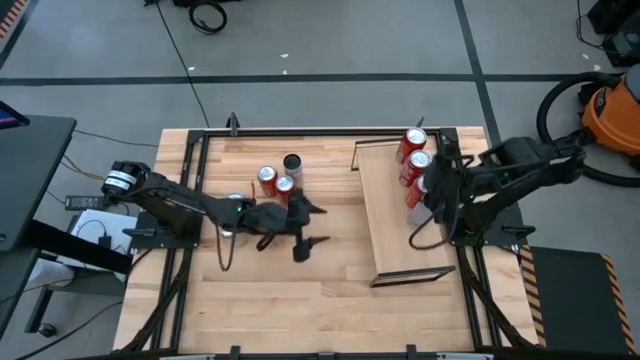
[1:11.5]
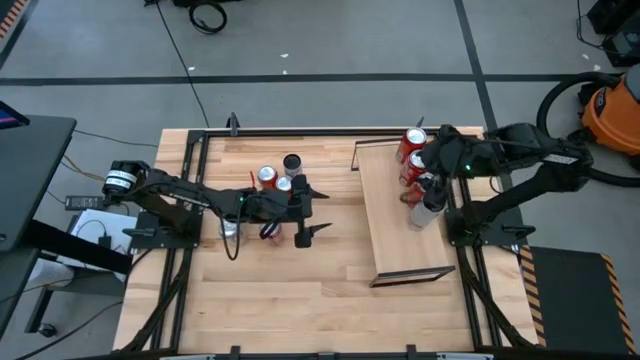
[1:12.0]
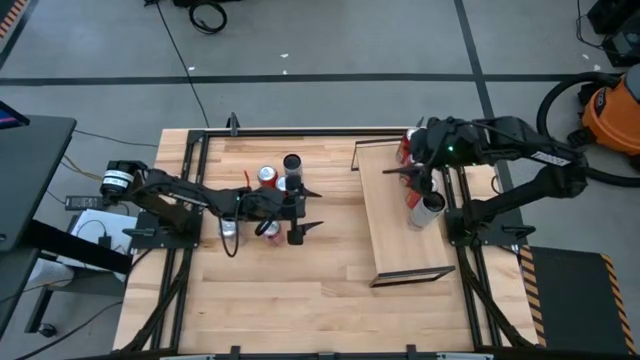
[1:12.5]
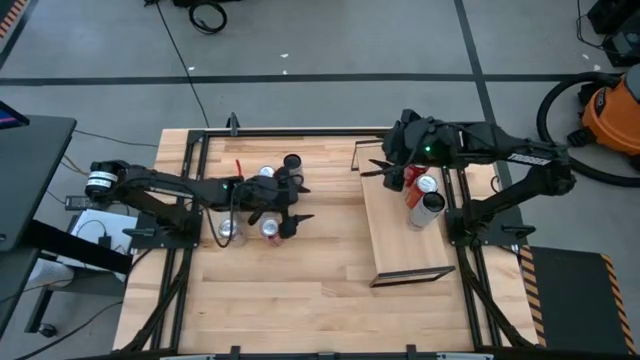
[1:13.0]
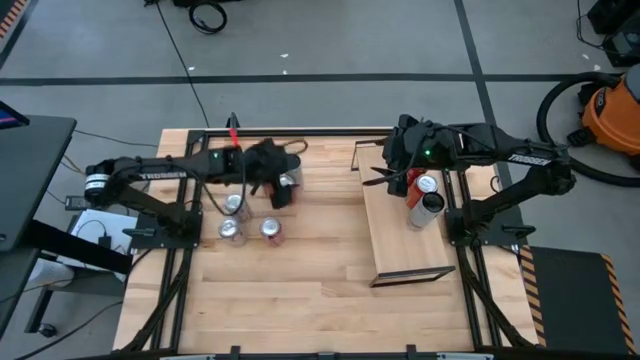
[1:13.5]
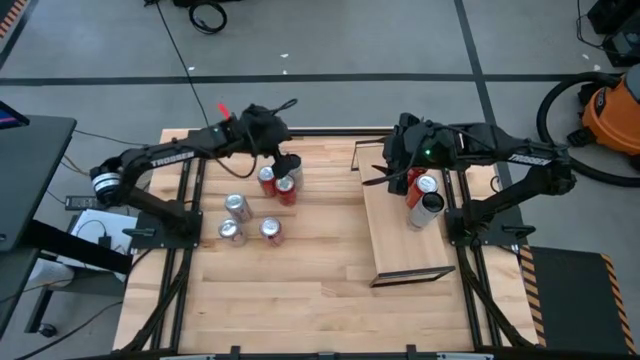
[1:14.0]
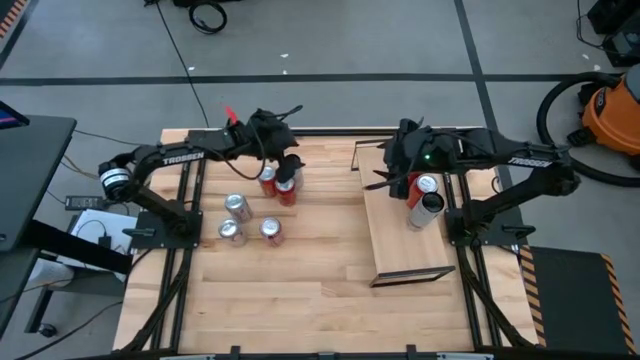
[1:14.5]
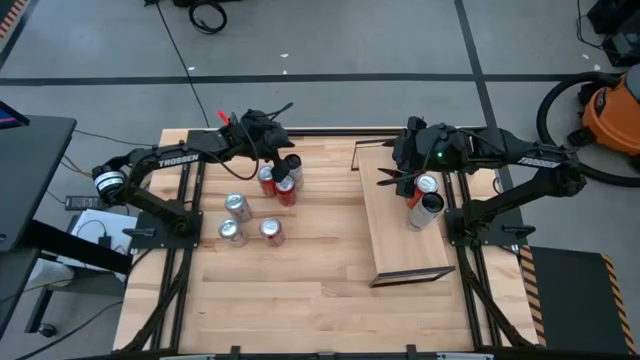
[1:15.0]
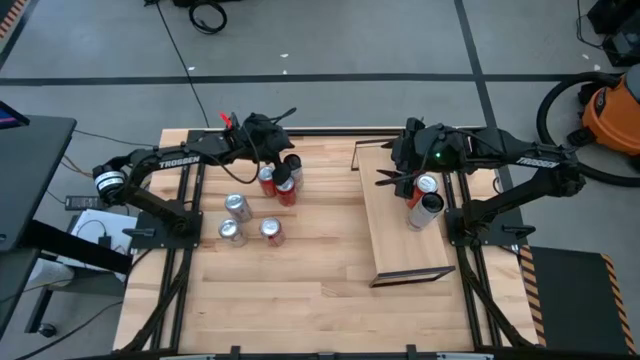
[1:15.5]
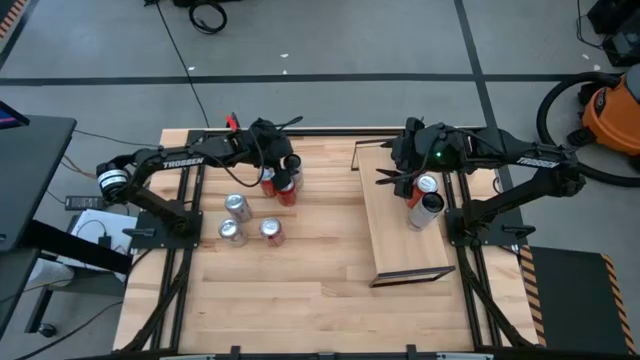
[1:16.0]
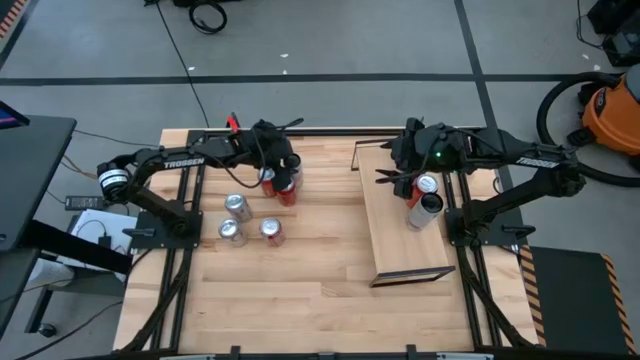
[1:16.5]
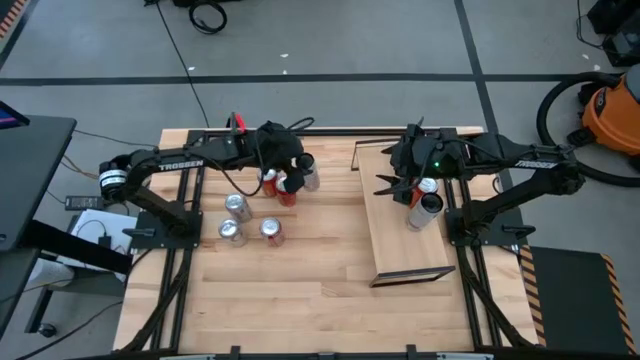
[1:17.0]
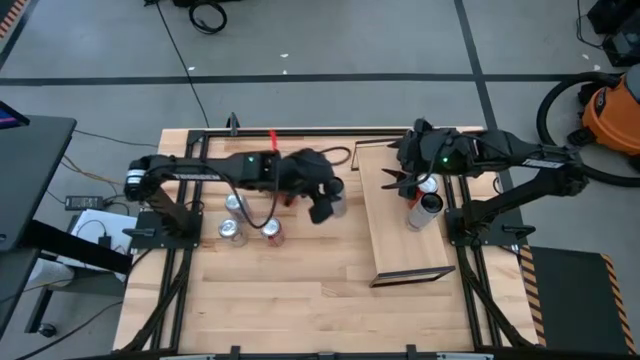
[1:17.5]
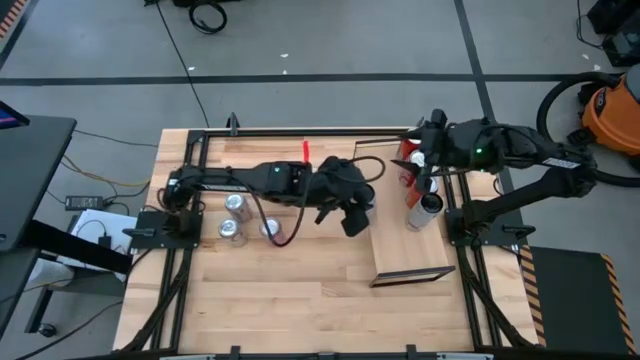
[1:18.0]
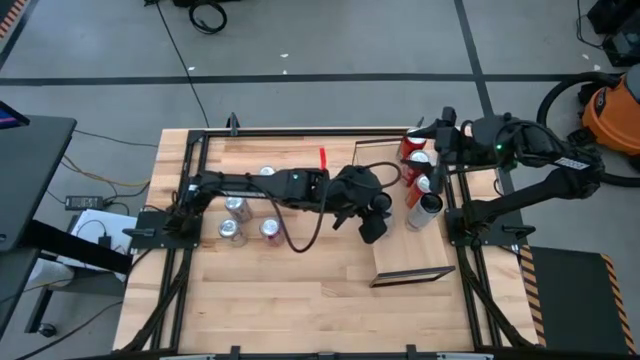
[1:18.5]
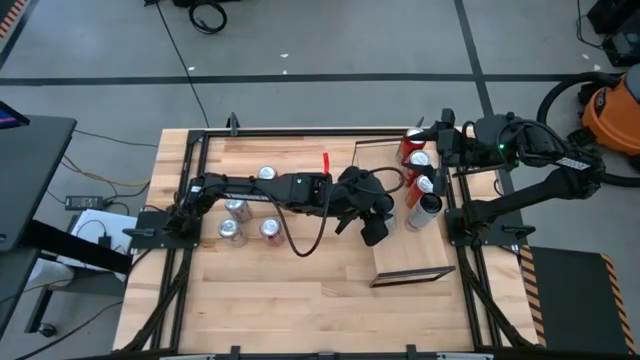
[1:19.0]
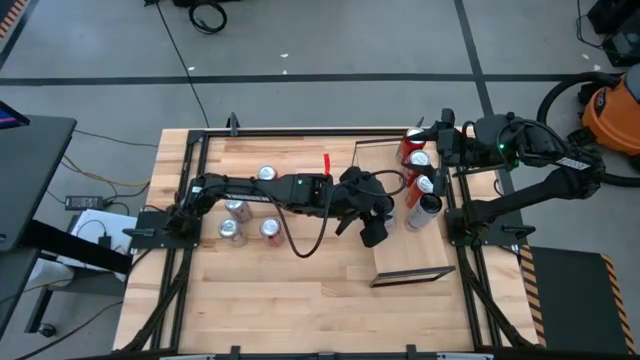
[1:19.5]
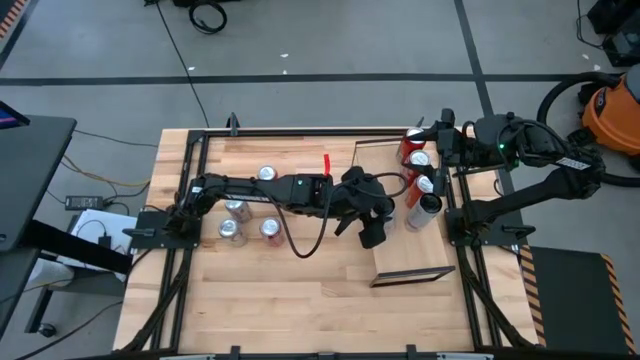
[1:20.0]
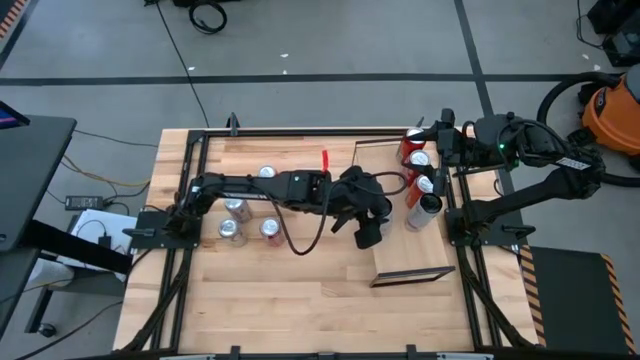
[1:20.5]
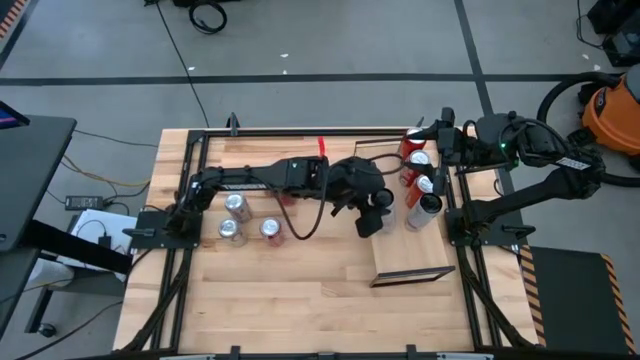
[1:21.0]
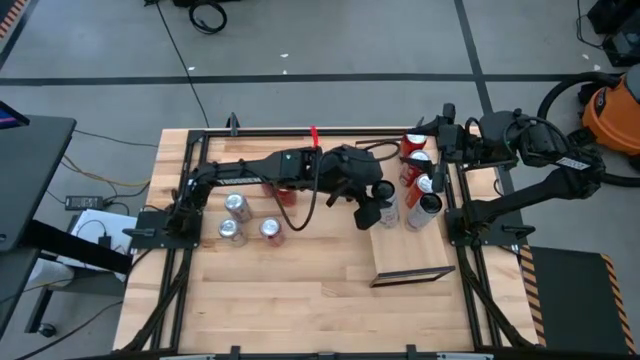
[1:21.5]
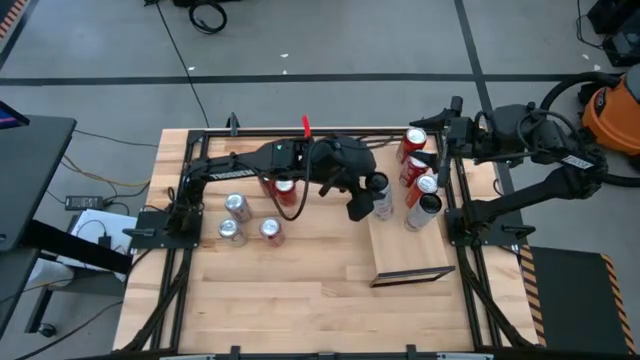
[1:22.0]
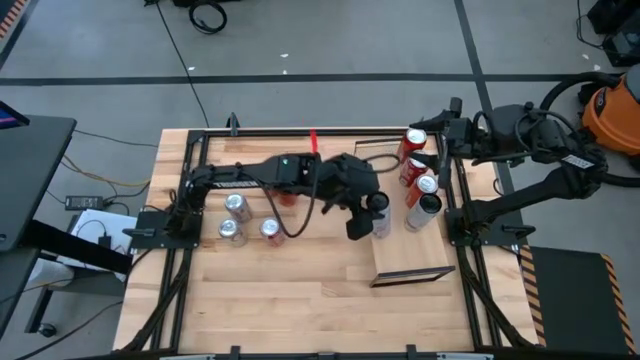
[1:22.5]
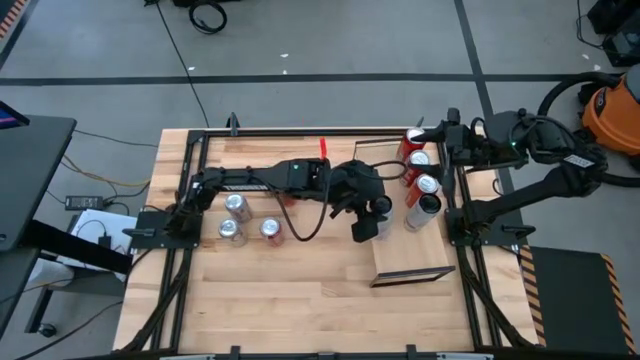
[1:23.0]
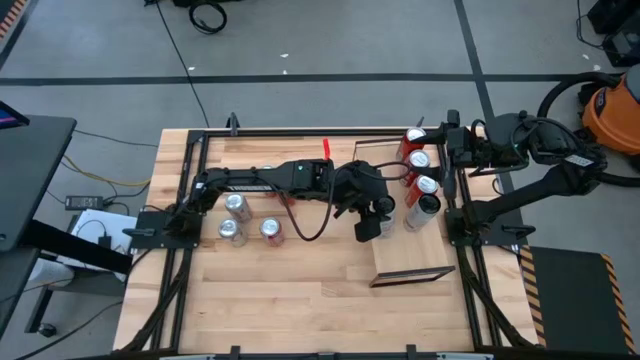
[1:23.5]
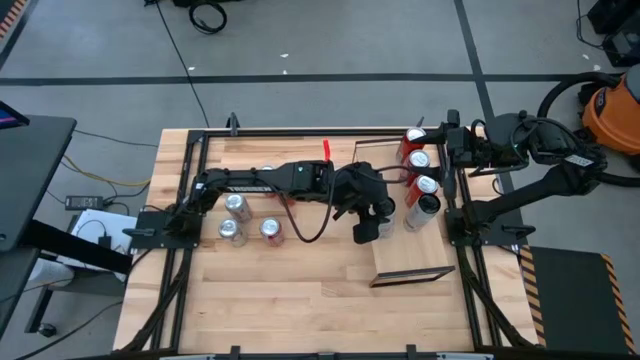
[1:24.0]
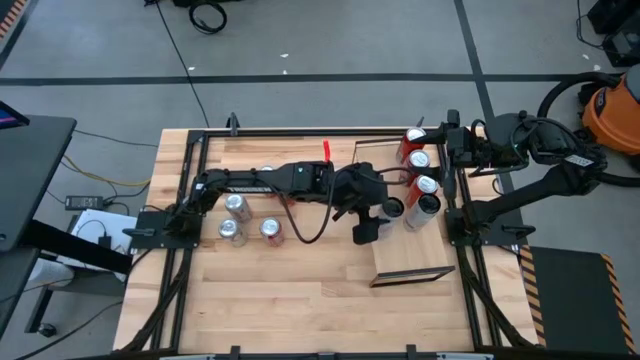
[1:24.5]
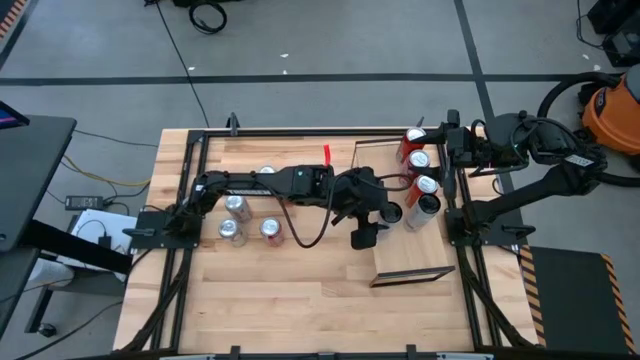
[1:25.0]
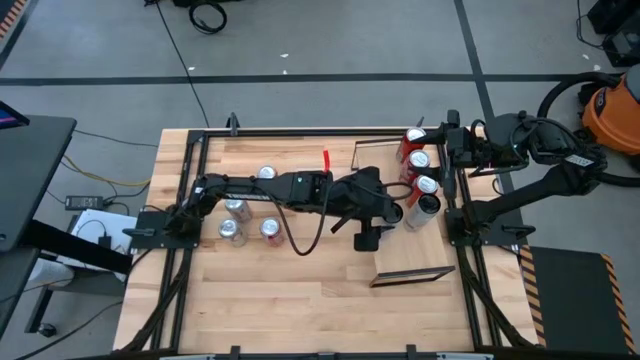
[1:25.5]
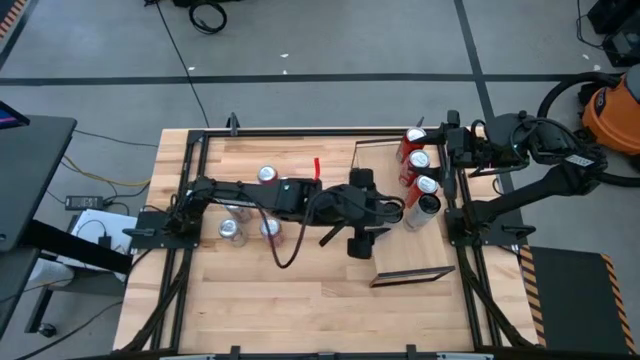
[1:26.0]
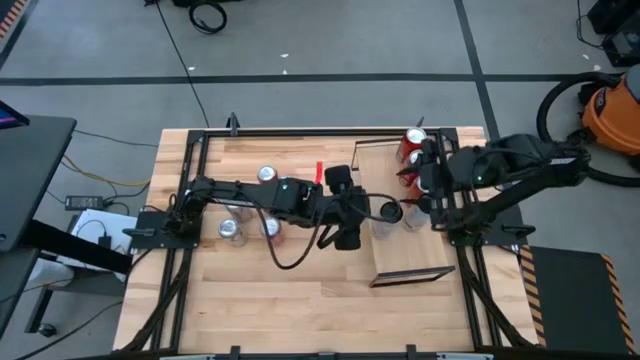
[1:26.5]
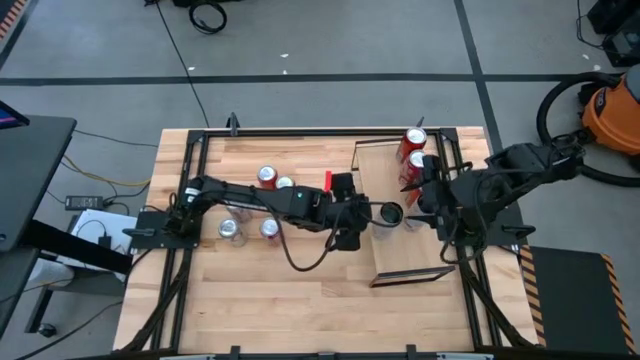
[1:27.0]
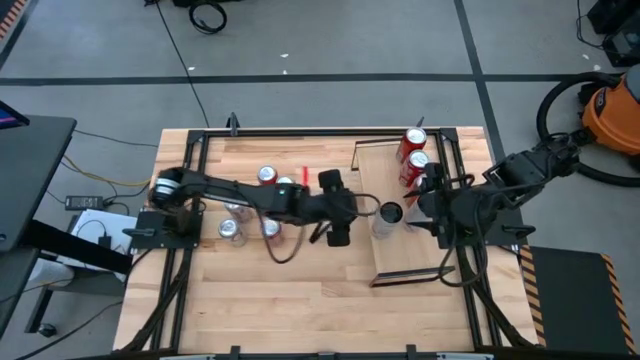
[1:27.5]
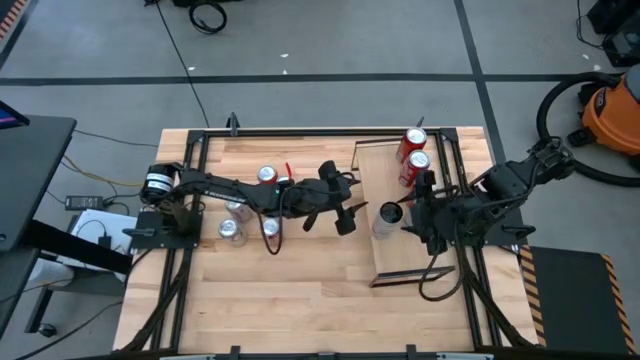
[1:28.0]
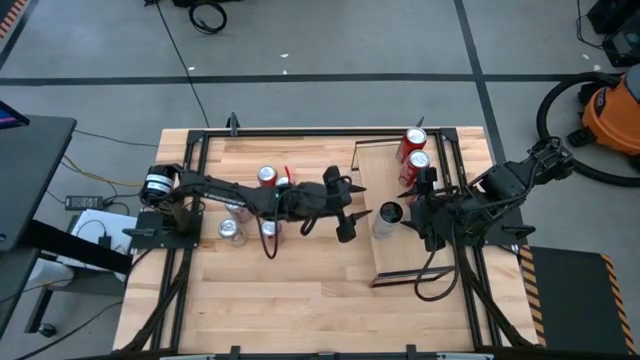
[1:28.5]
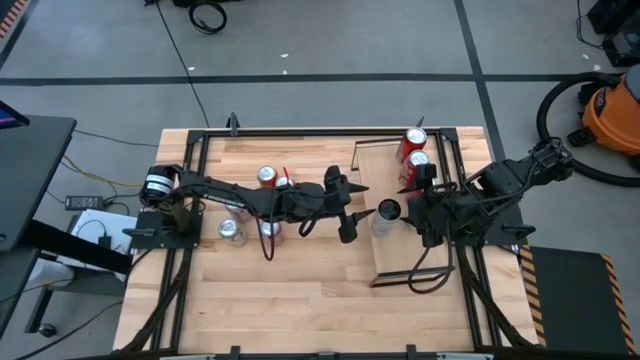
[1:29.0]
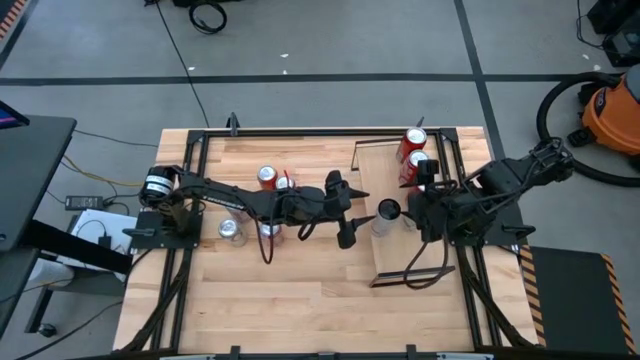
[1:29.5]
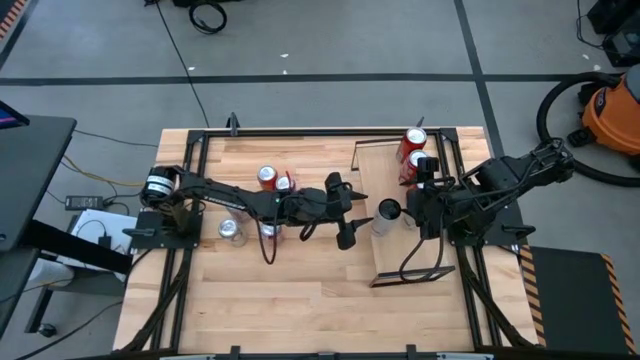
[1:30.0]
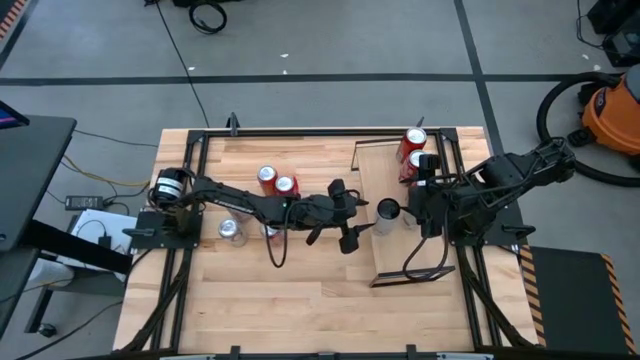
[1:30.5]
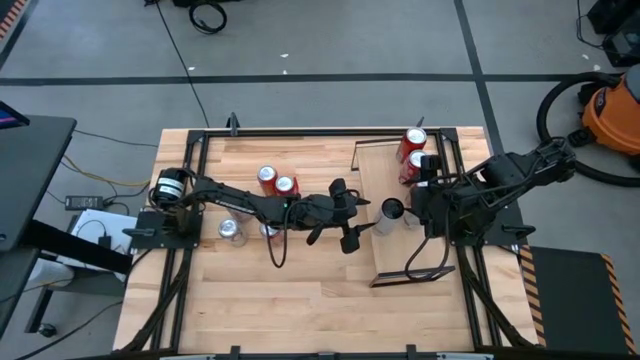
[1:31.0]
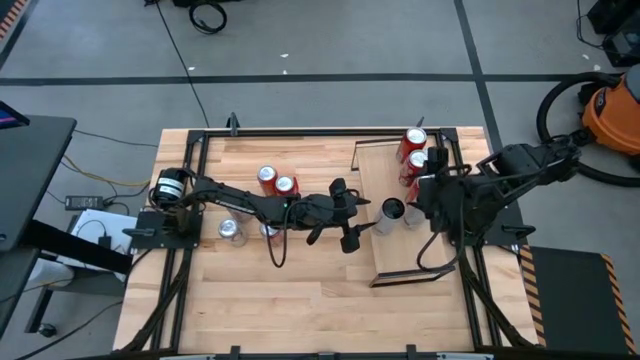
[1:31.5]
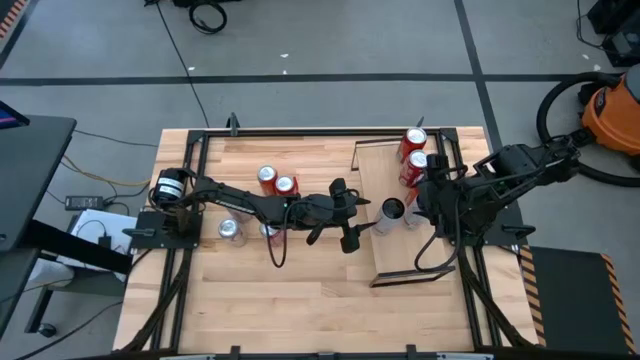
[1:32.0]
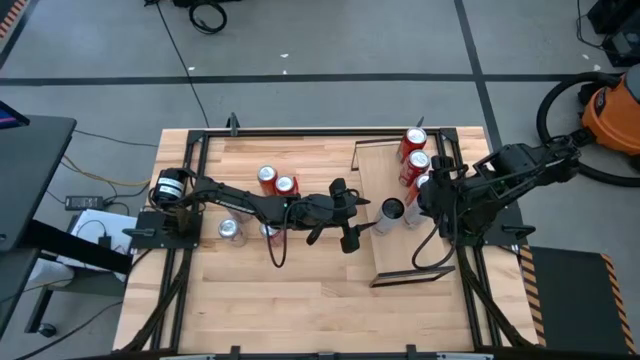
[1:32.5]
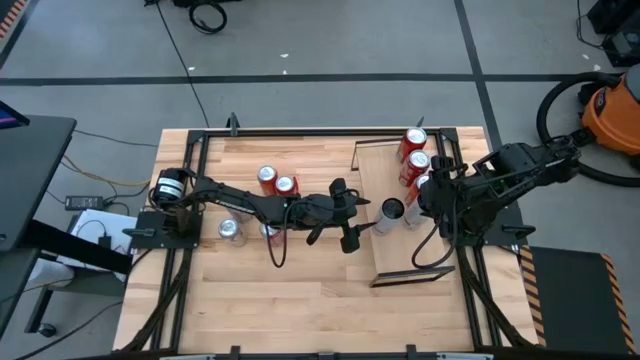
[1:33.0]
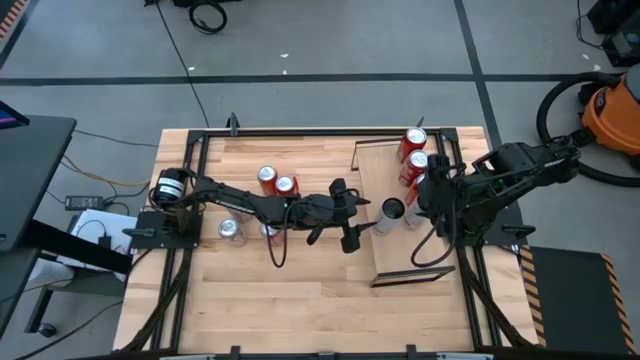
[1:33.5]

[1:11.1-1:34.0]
Task: Place canned beverage on shelf
Put the white pink soda can on the shelf aligned with the other white pink soda can
